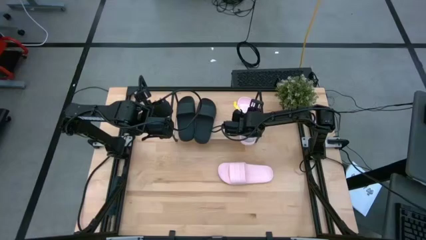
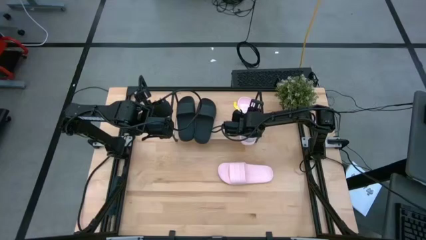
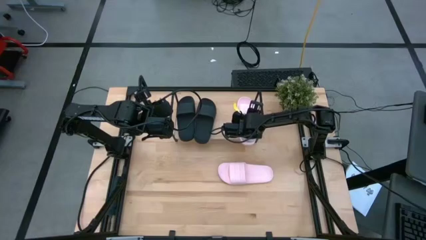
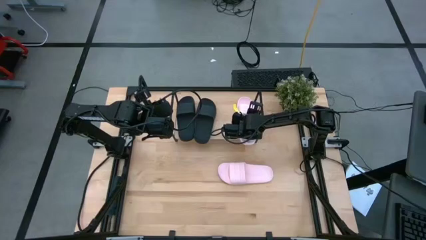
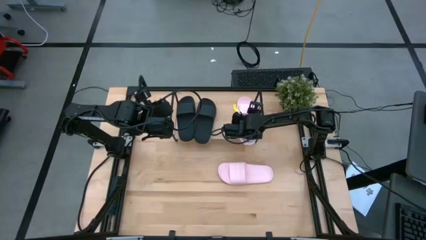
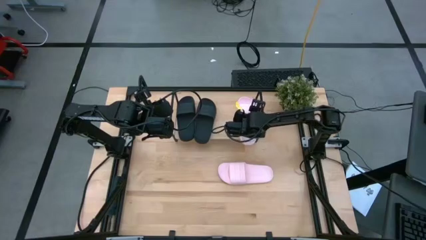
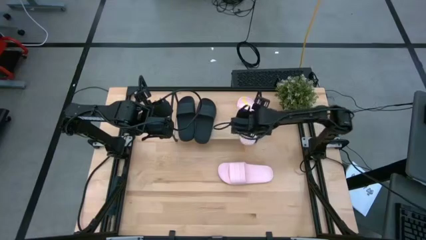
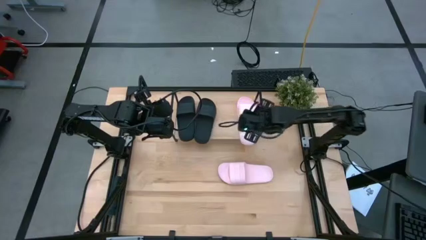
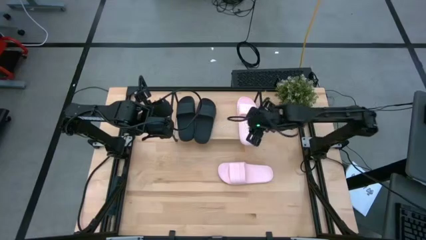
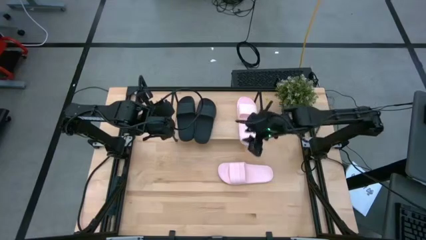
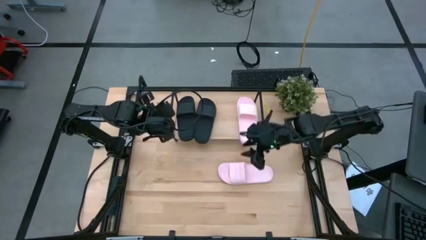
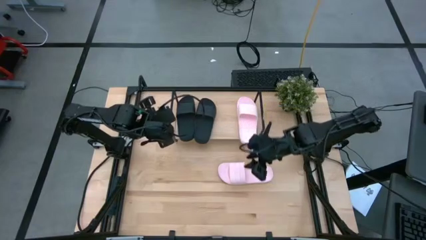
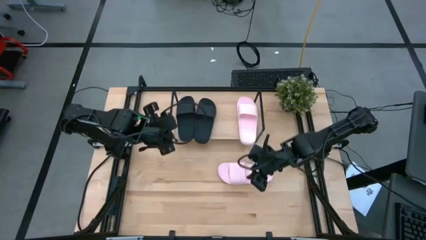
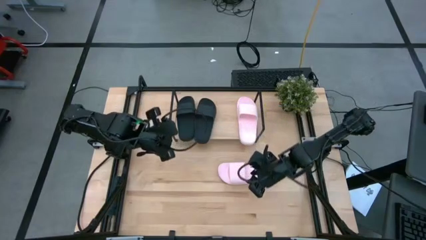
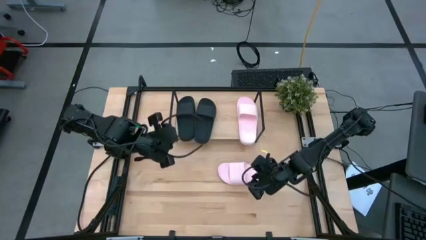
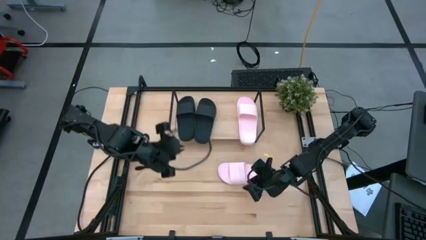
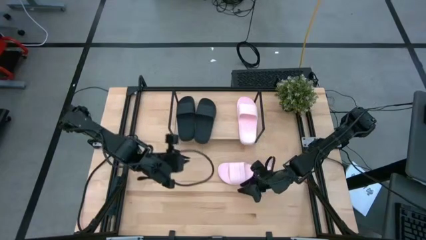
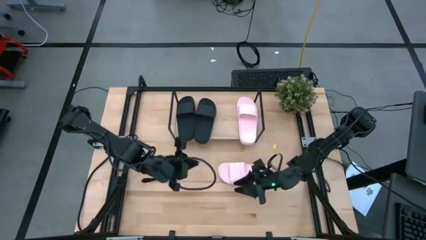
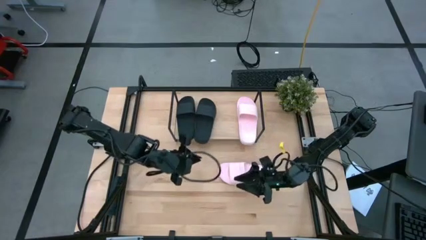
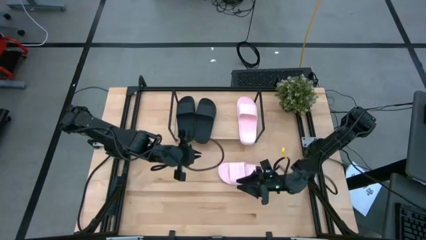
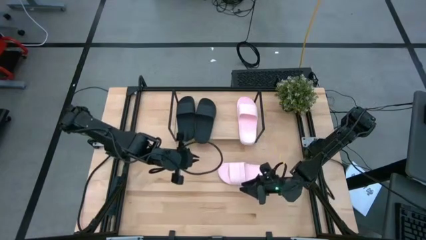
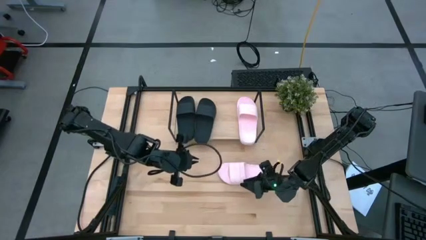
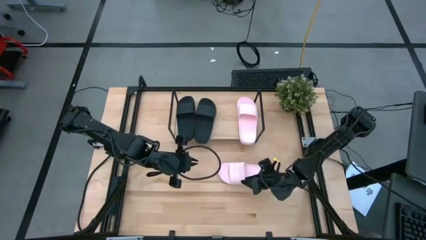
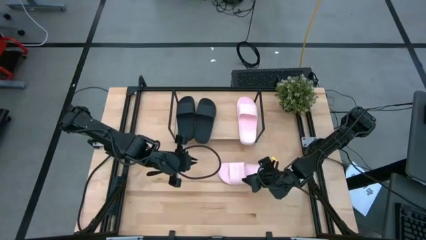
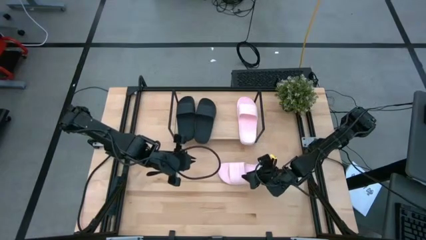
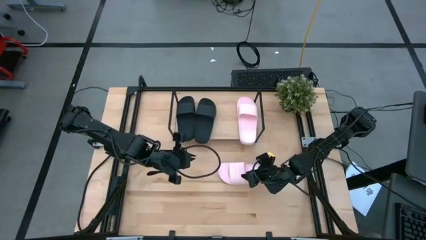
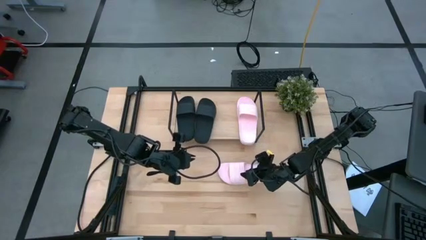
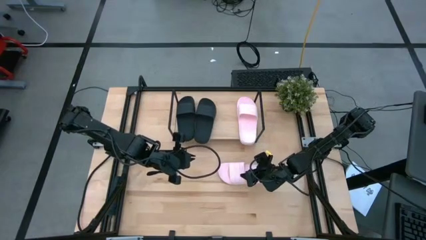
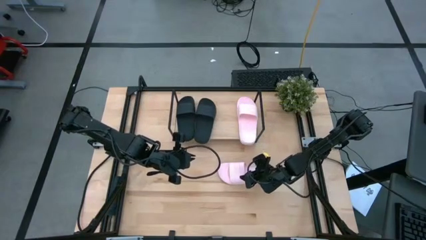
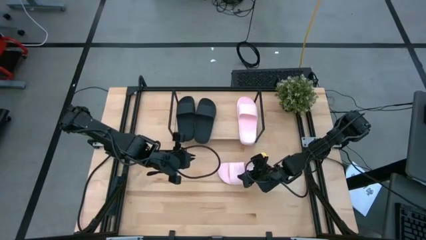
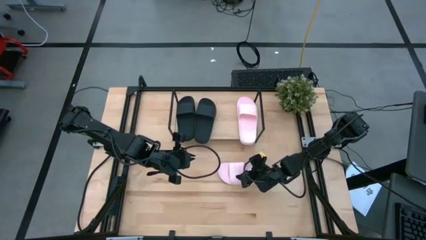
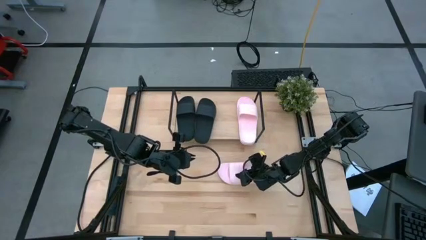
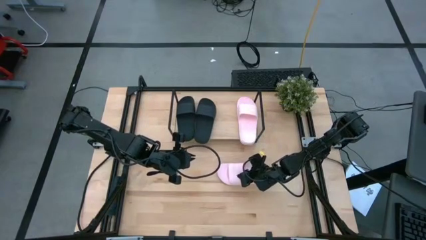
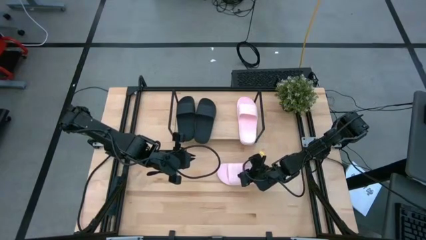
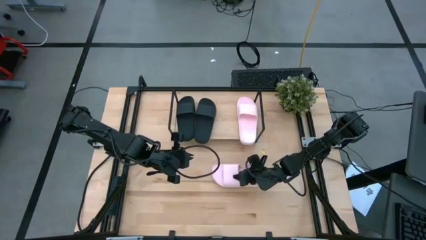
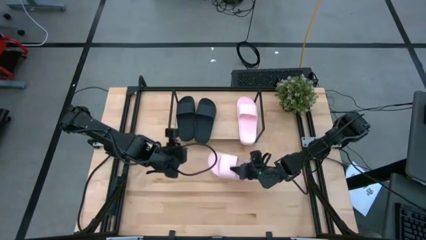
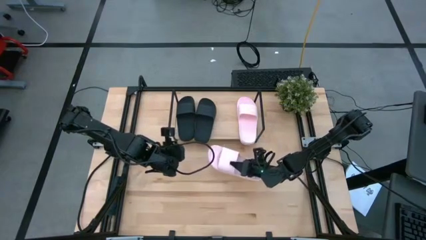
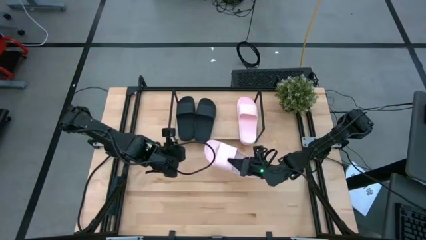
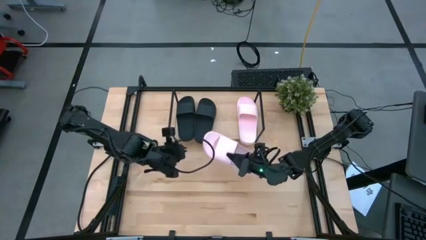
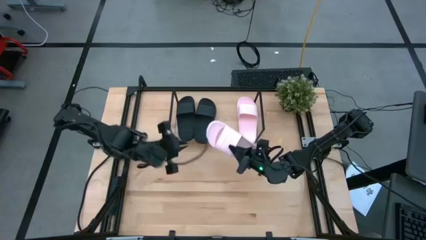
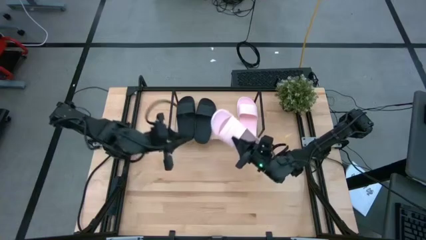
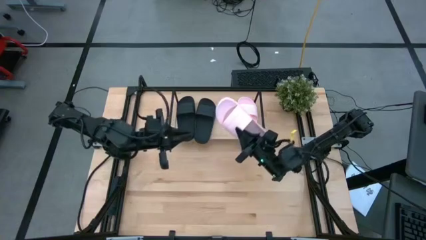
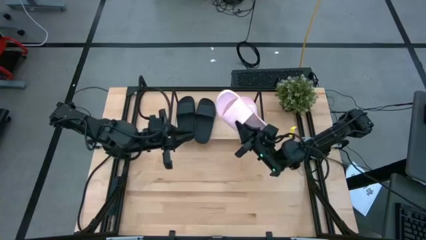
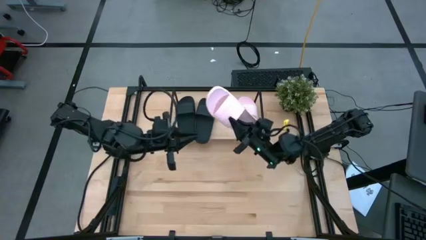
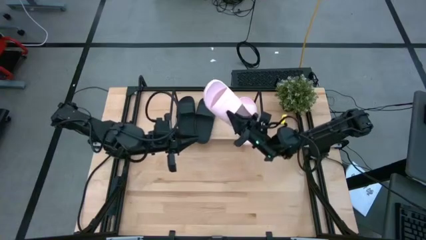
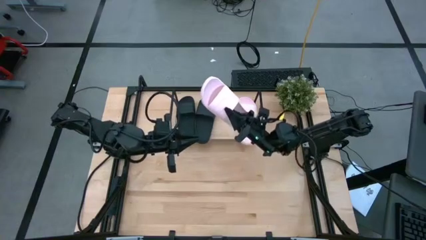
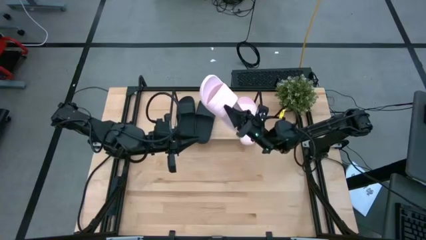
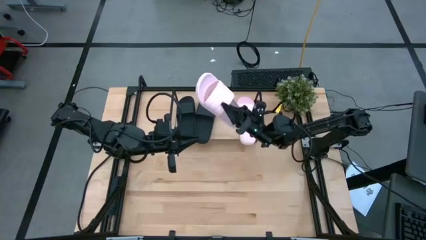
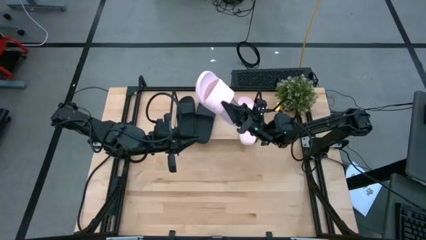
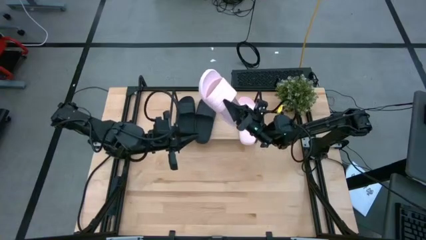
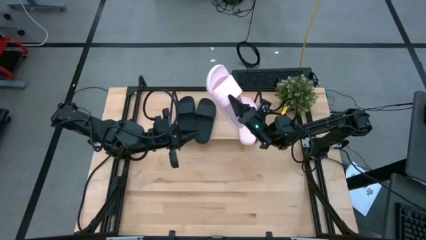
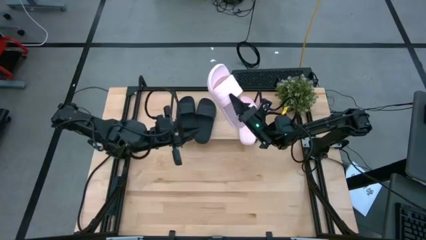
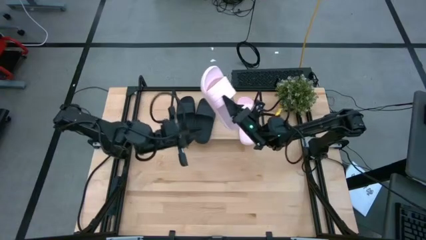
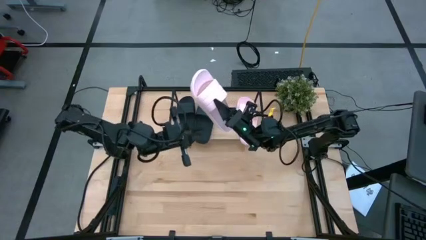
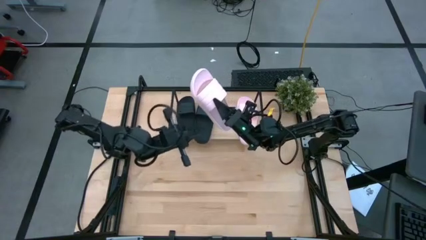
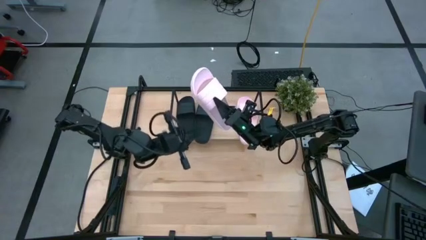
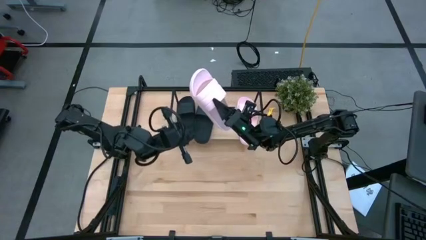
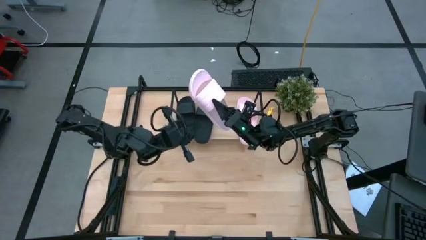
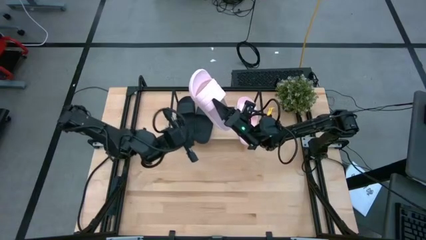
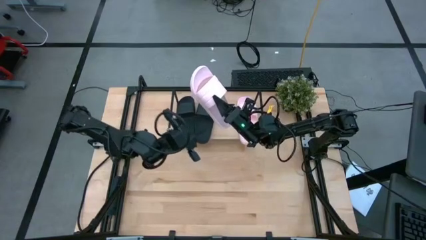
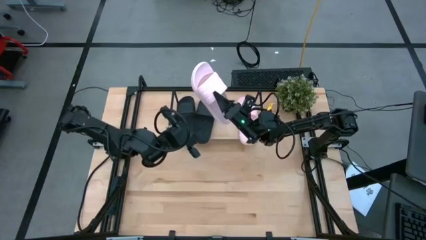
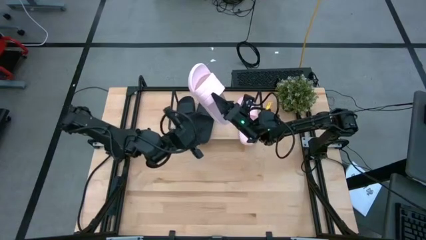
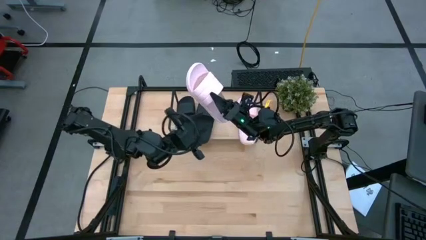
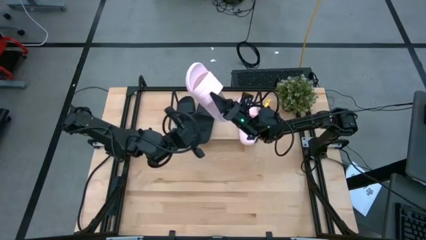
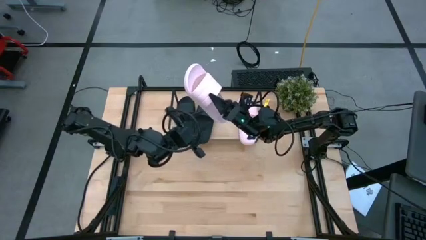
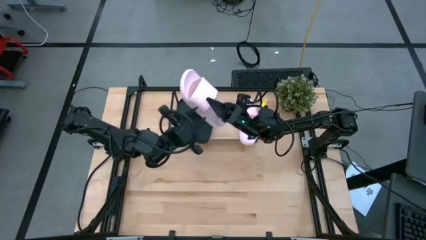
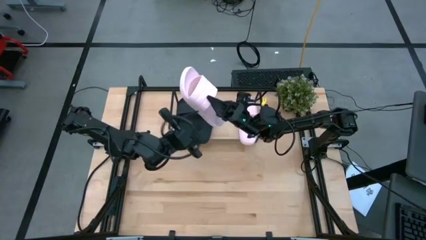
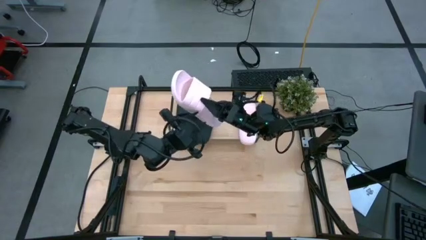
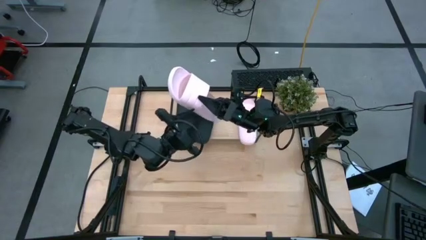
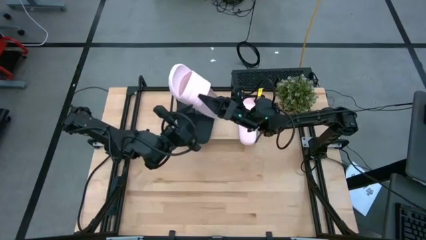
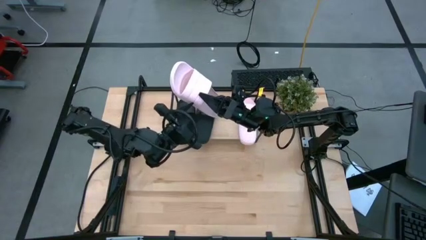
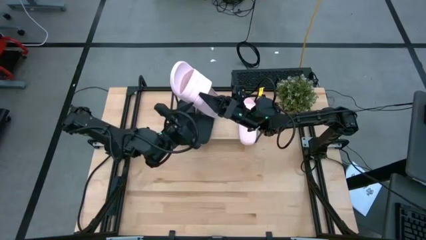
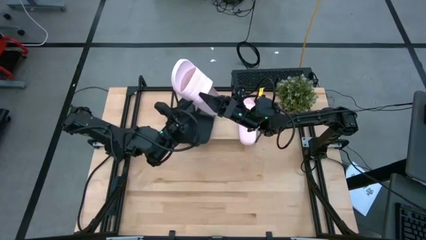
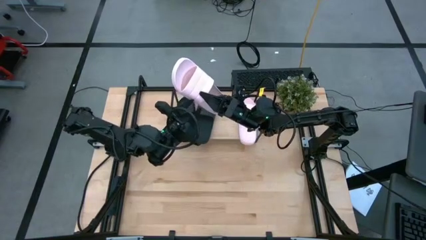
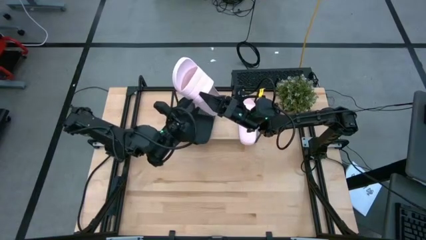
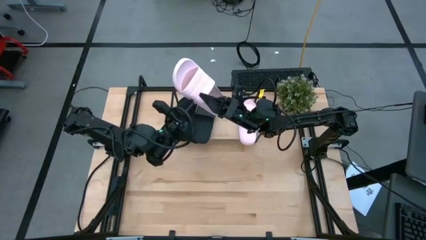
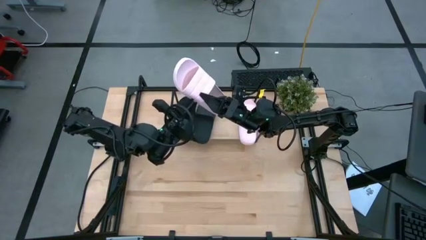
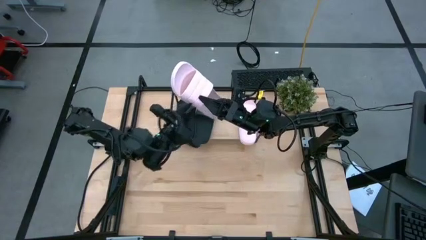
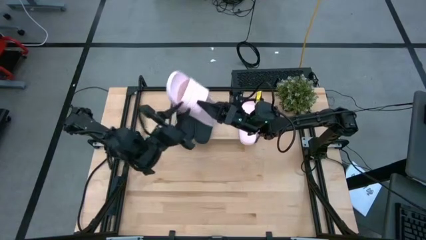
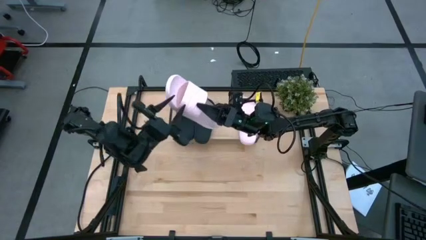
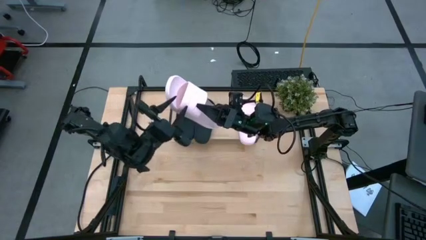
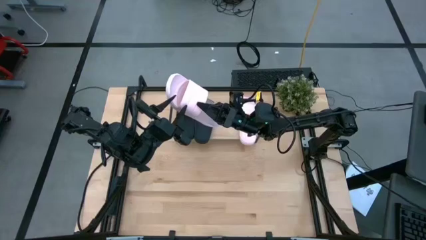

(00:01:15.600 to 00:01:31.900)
Task: Pick and place slides into the shelf
Put the pink slide on the shelf
